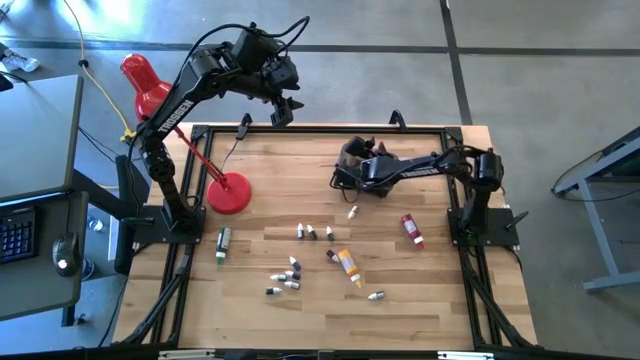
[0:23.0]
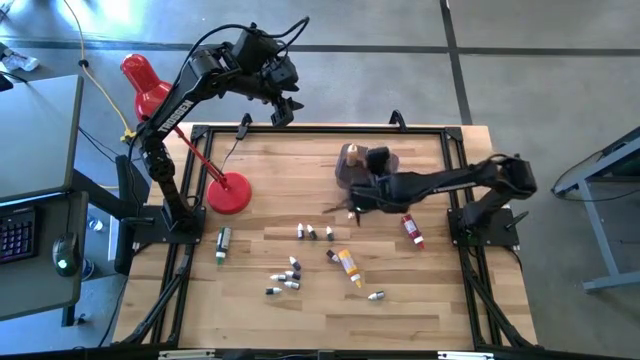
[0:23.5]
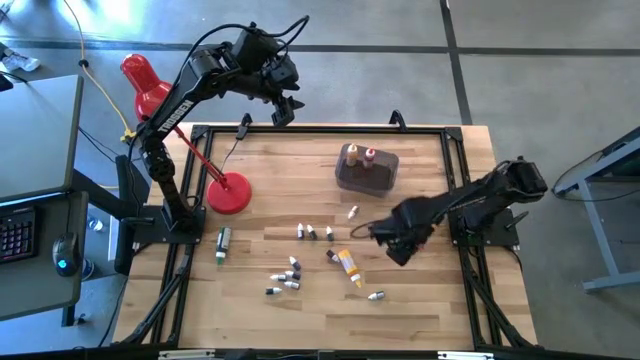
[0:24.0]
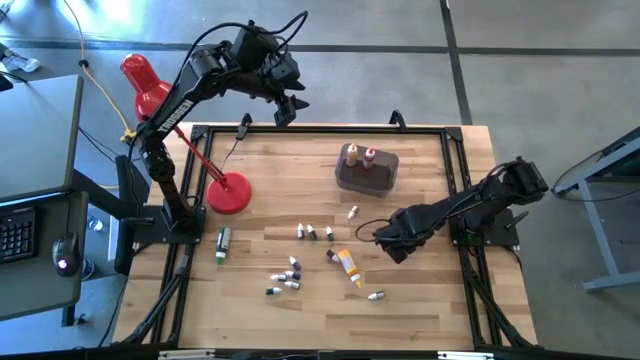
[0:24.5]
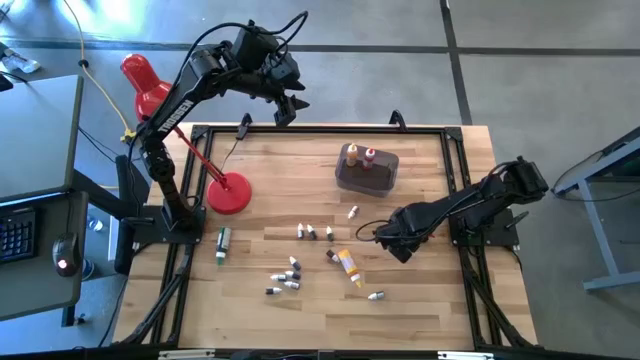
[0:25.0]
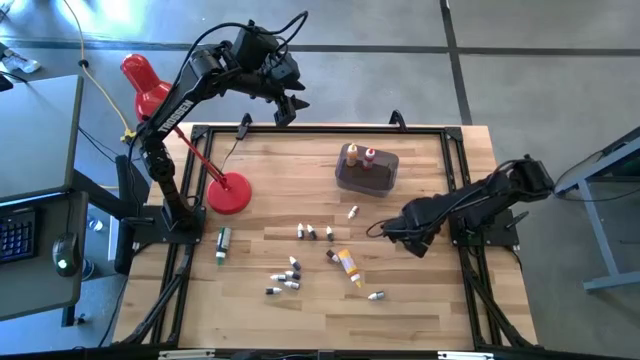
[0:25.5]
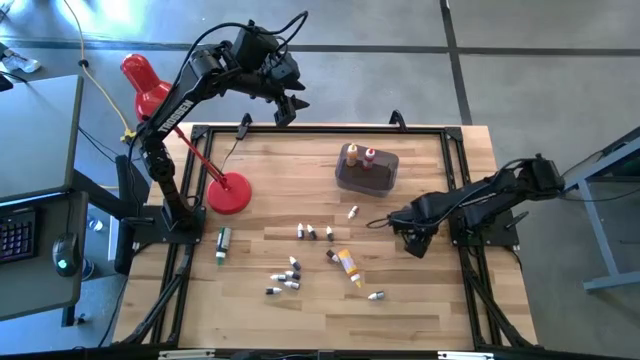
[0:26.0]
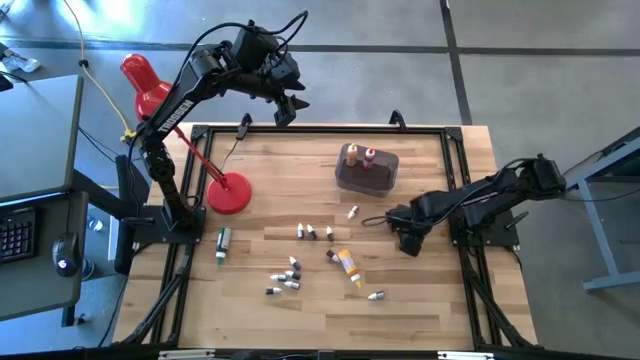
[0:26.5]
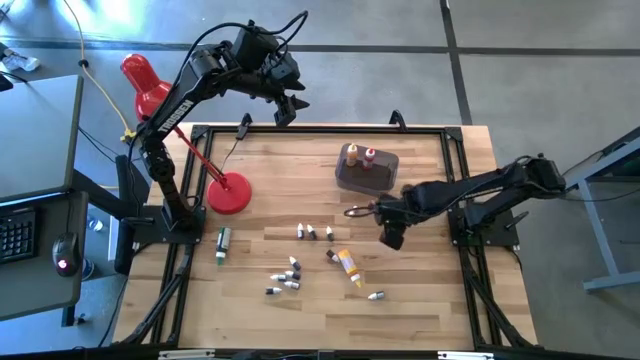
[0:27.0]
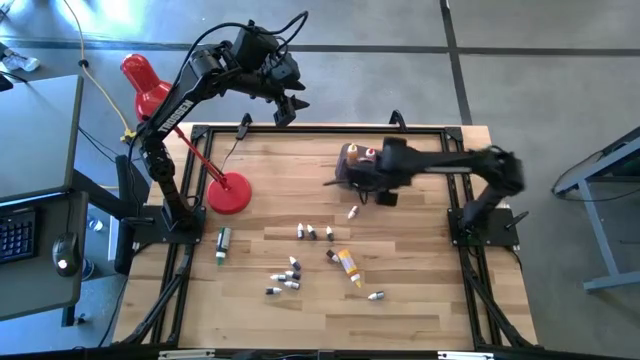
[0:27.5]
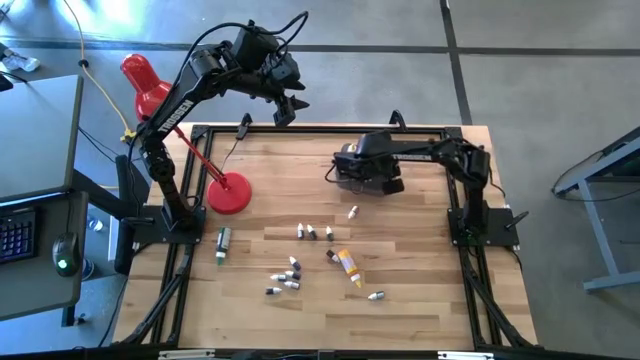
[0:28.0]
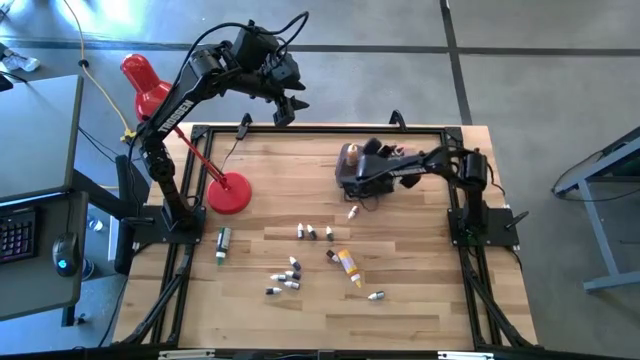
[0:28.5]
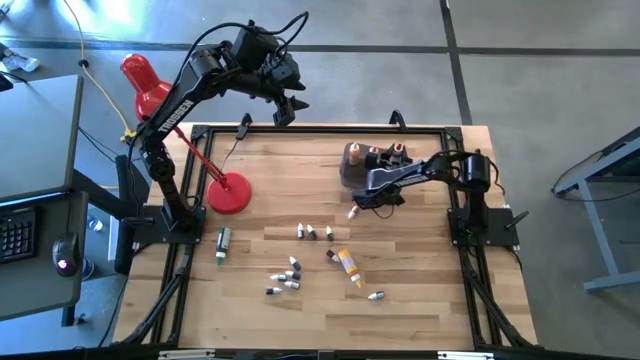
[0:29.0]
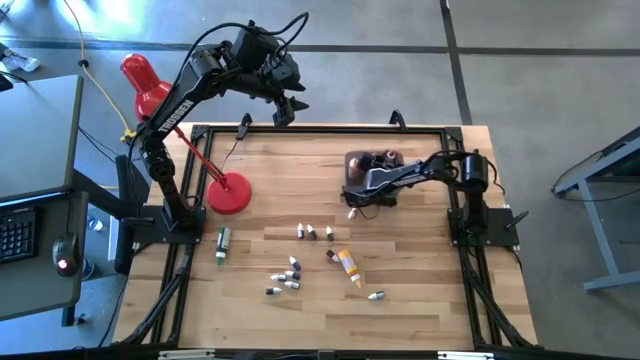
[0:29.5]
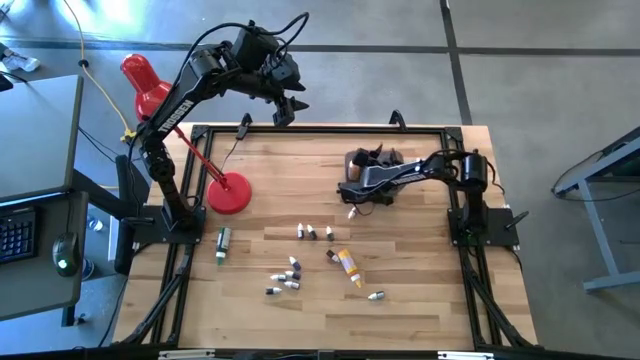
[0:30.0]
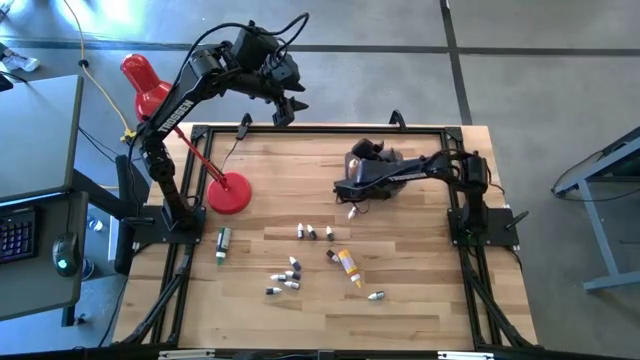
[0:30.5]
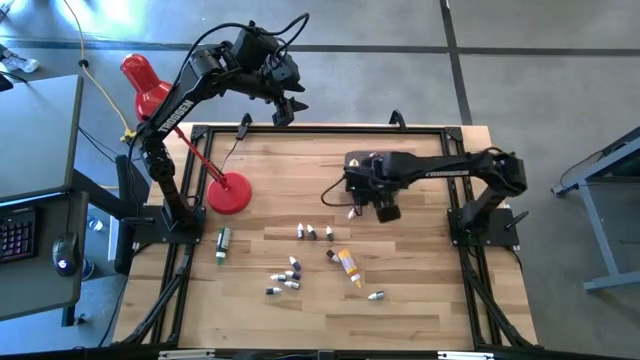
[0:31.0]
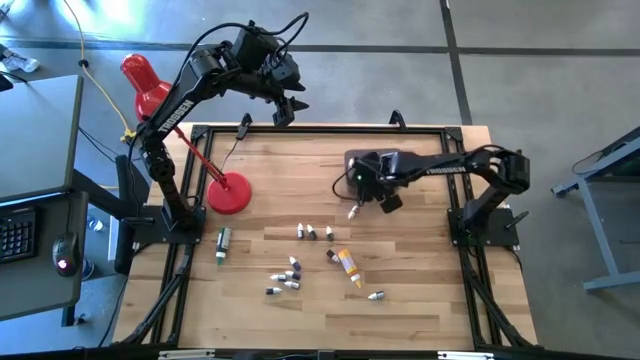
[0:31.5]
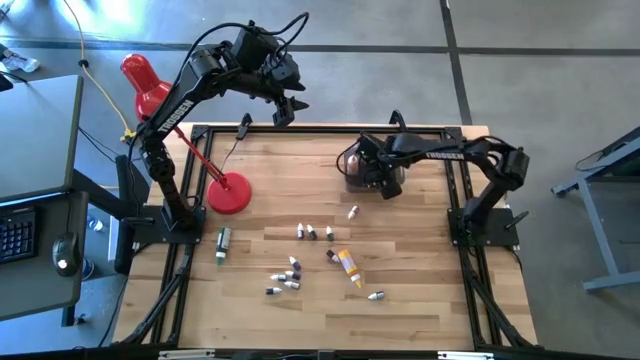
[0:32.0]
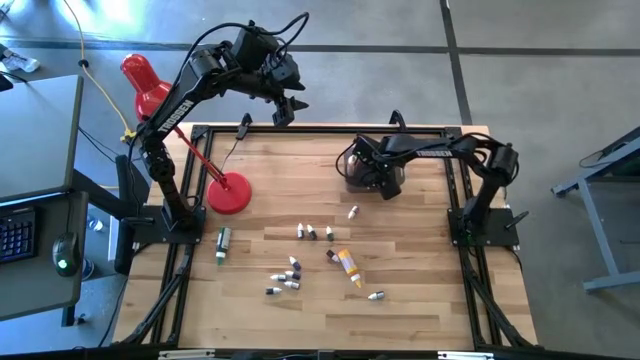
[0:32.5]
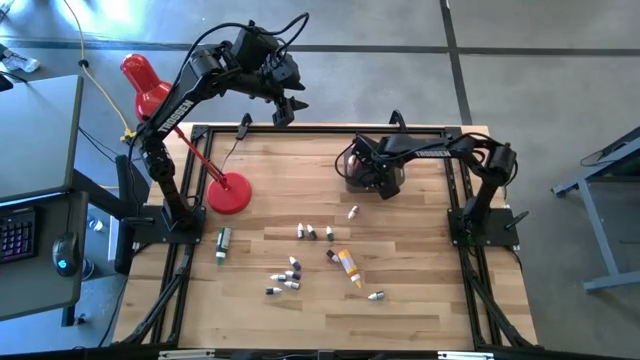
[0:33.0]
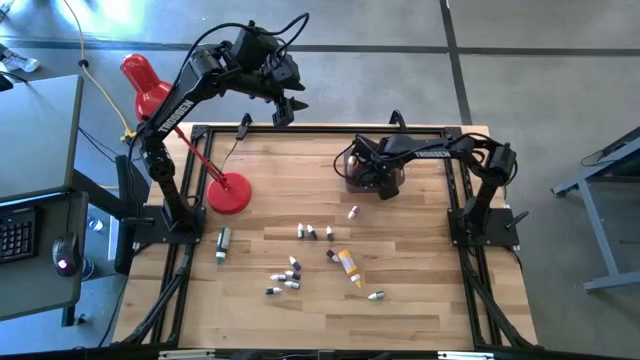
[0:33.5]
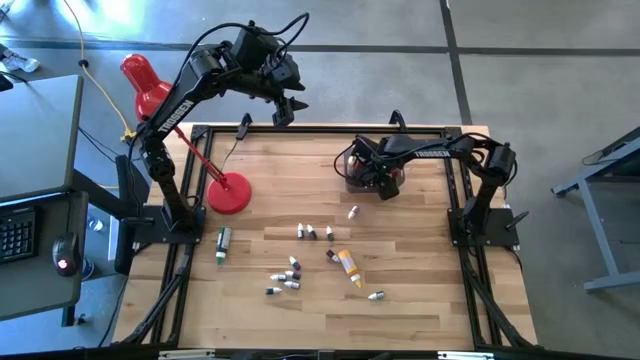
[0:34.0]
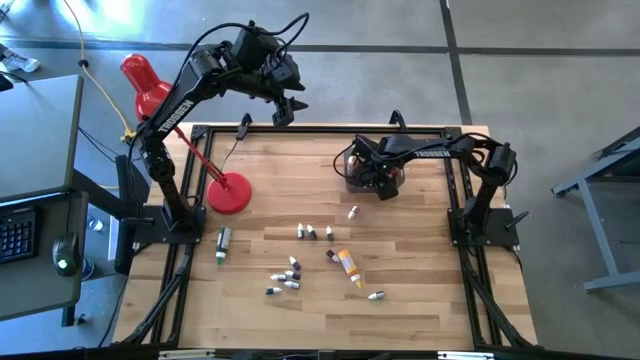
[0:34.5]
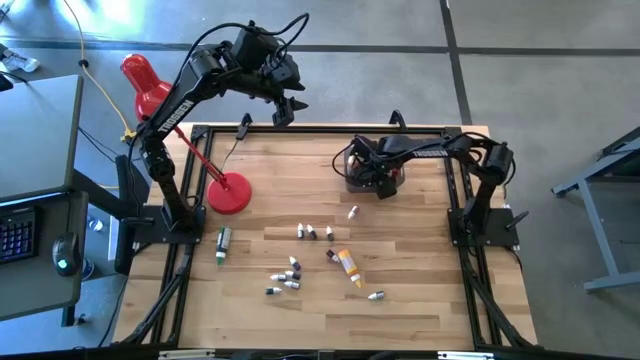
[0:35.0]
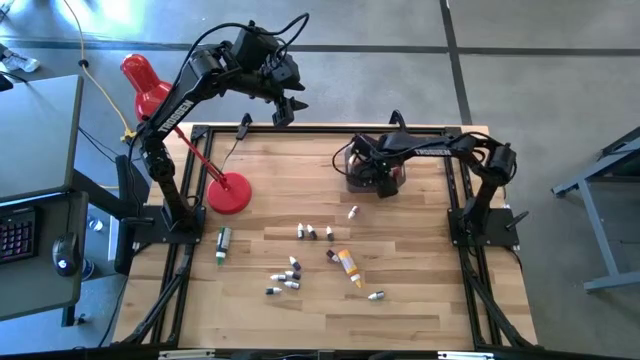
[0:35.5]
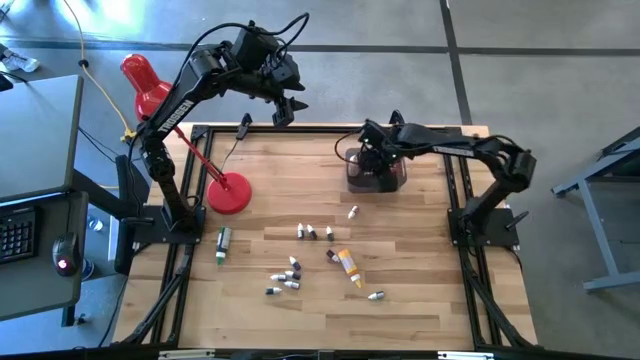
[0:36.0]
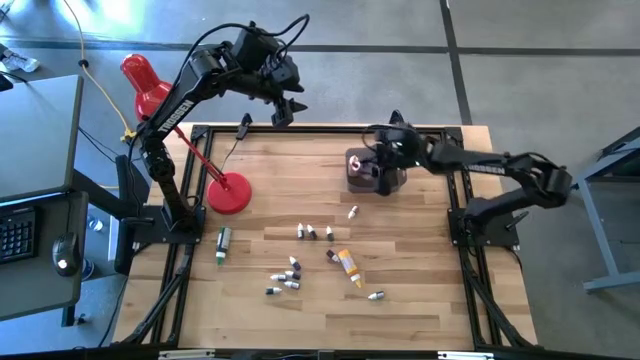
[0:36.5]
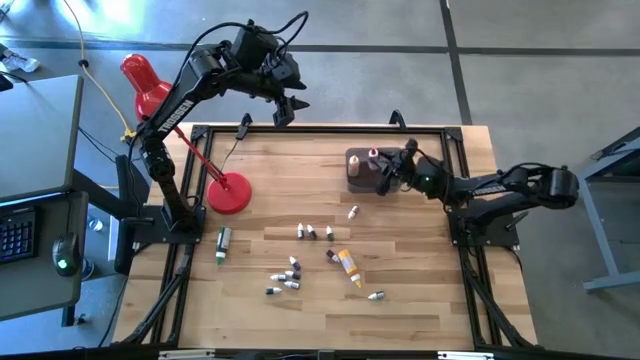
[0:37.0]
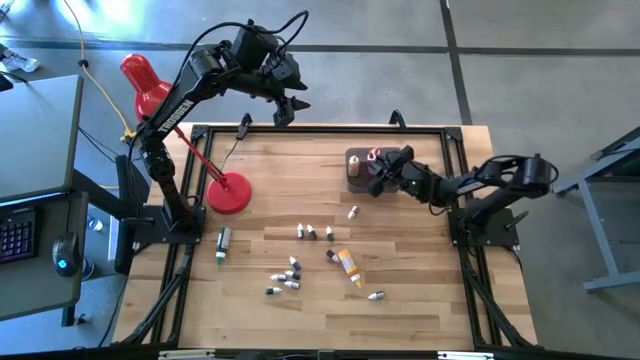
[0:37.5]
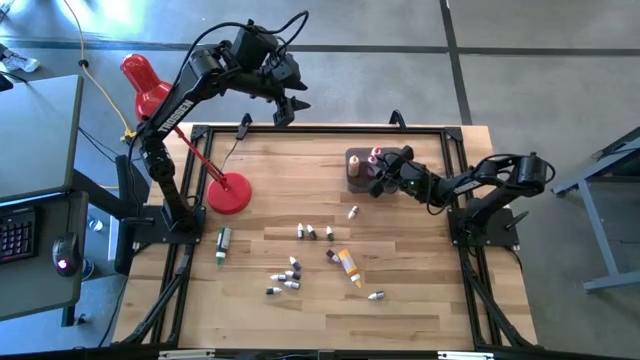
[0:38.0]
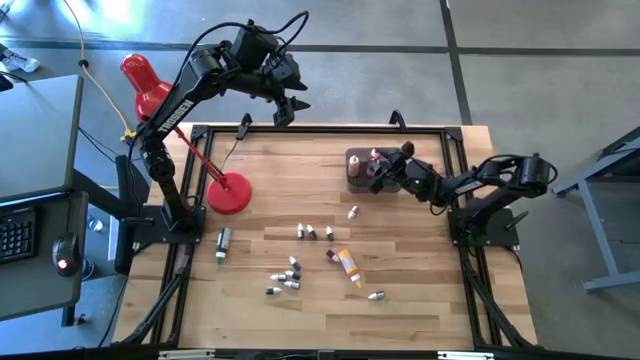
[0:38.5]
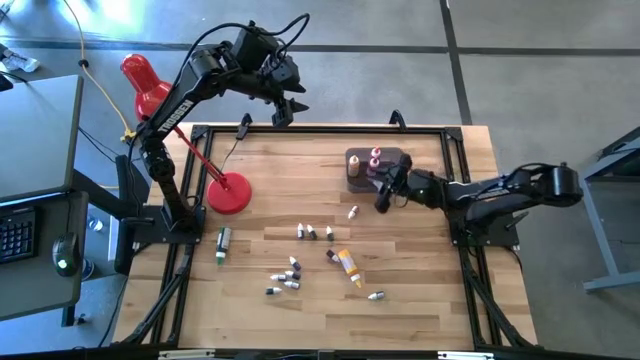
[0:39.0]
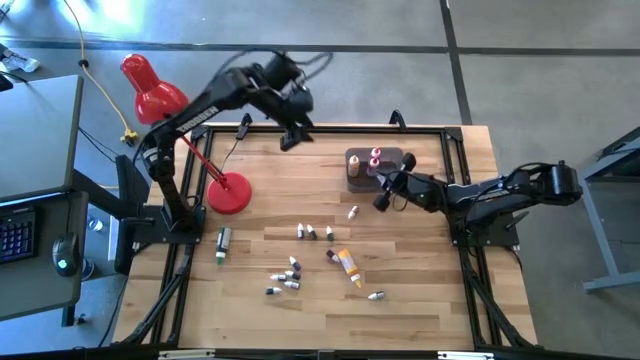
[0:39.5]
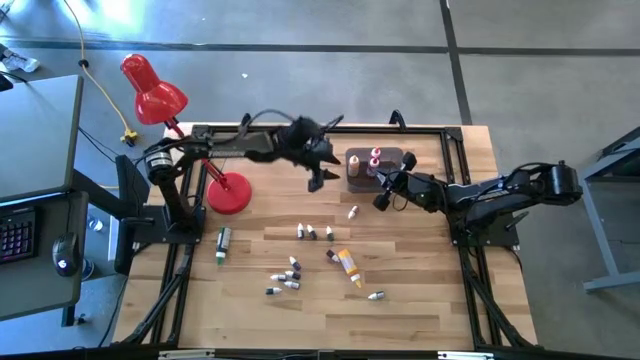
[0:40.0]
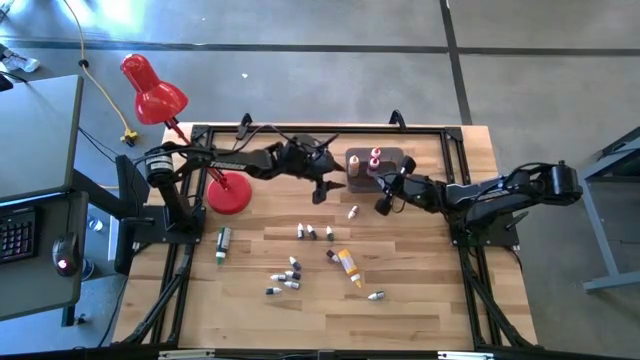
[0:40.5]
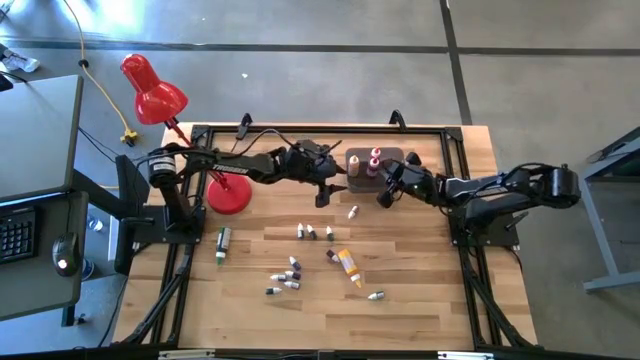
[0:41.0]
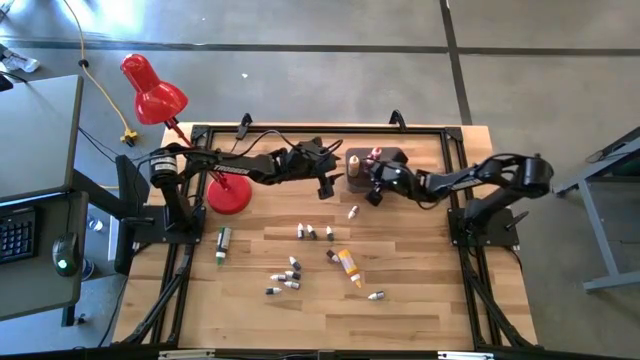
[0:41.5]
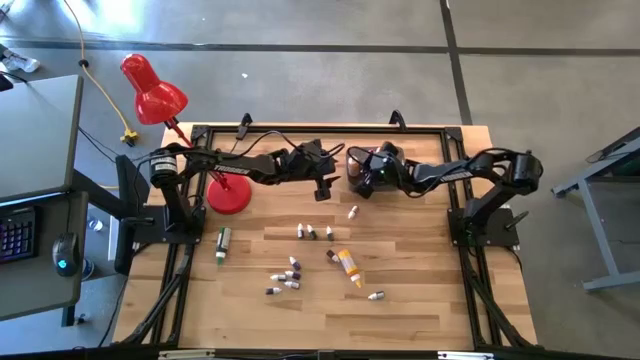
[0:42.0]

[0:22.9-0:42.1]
Task: Pick & Place food coloring
Put the large red food coloring bottle into the bin

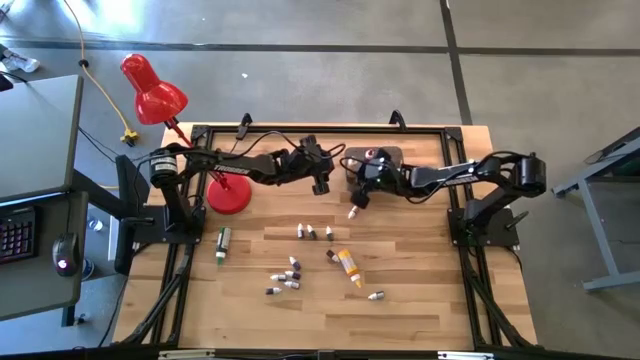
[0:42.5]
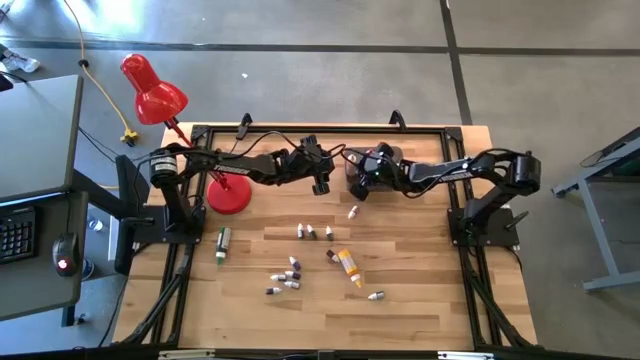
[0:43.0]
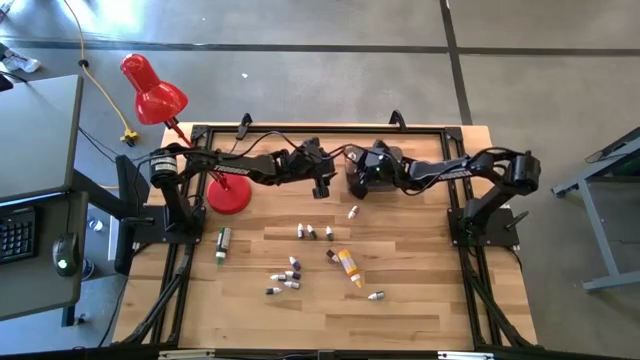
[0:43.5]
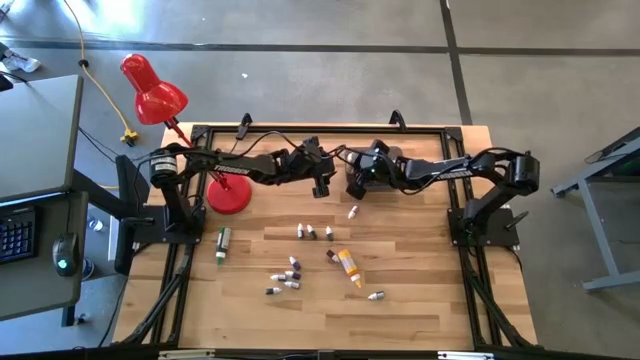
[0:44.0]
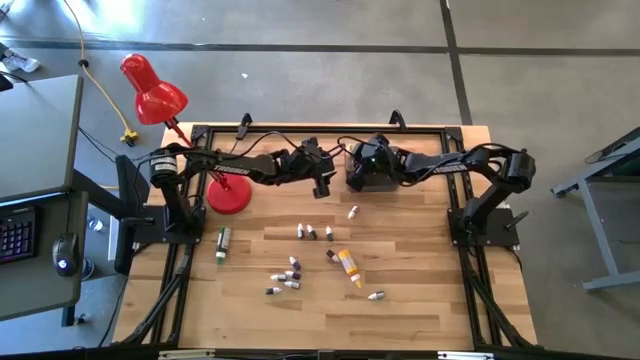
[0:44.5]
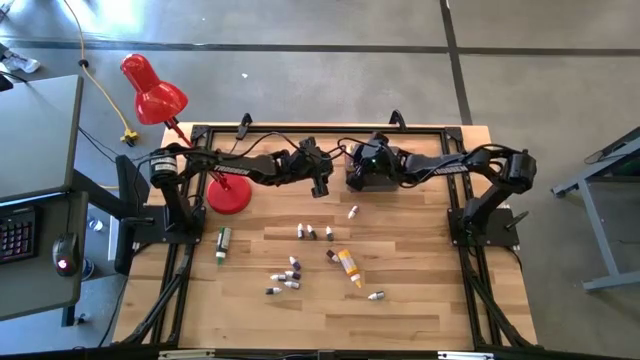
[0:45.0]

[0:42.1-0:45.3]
Adjust the large yellow food coloring bottle in the bin
